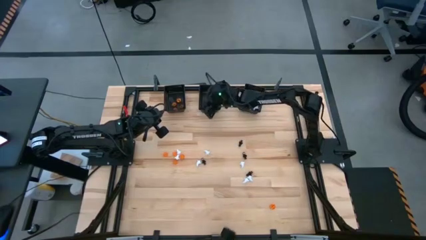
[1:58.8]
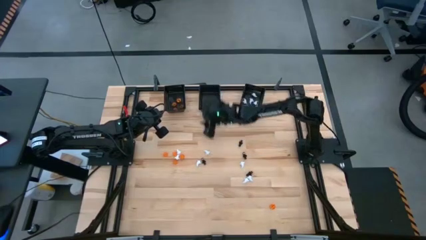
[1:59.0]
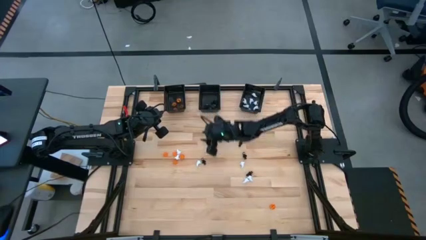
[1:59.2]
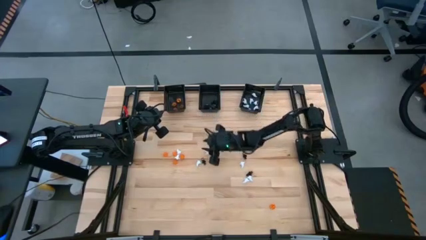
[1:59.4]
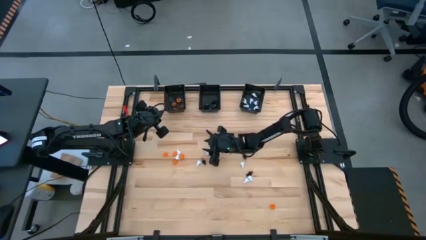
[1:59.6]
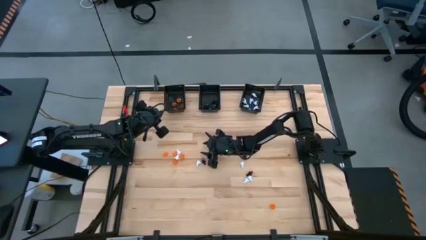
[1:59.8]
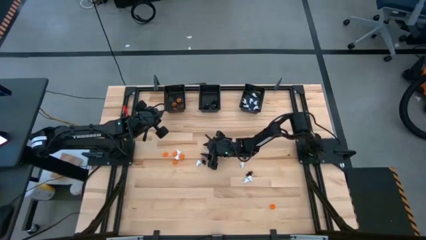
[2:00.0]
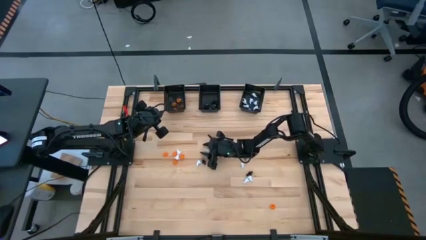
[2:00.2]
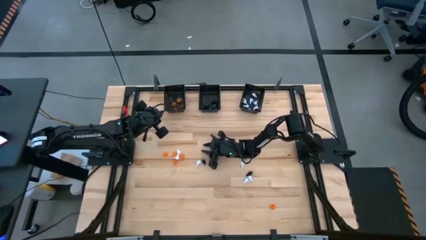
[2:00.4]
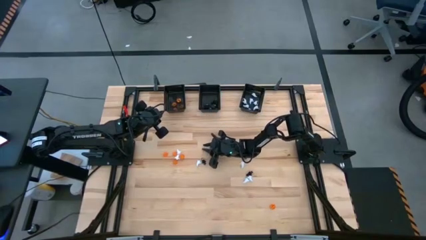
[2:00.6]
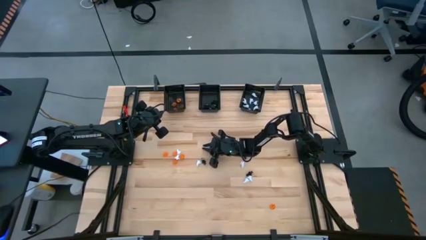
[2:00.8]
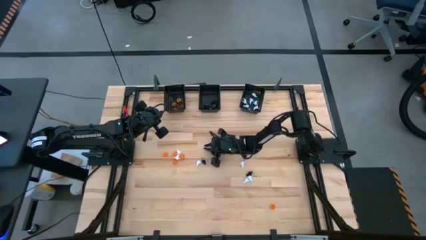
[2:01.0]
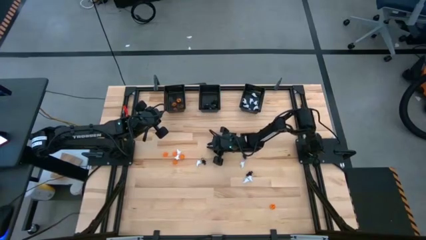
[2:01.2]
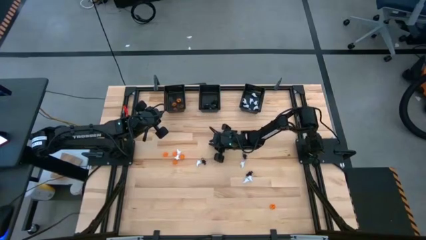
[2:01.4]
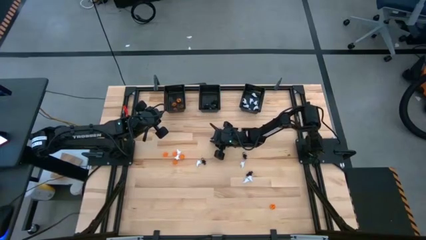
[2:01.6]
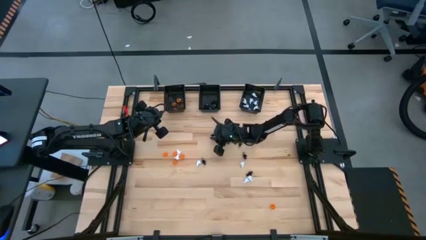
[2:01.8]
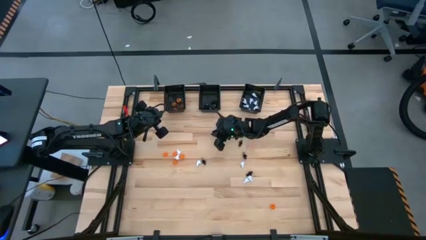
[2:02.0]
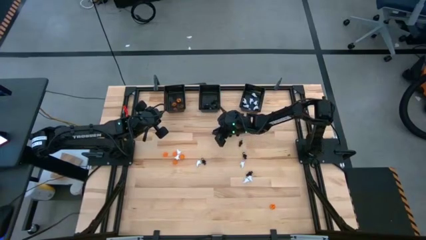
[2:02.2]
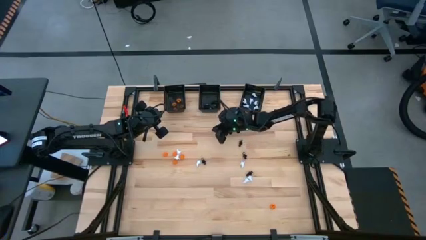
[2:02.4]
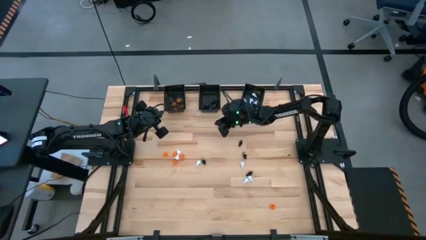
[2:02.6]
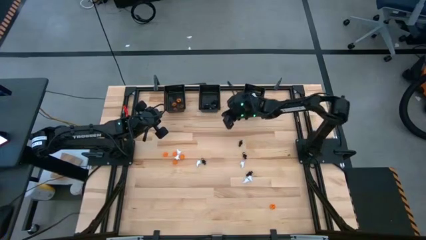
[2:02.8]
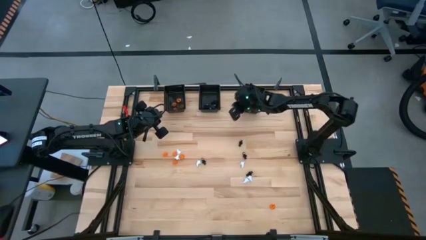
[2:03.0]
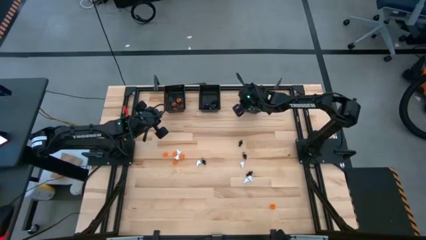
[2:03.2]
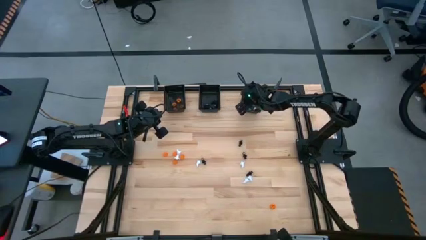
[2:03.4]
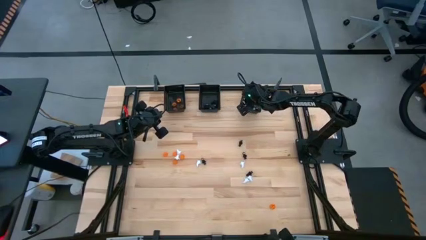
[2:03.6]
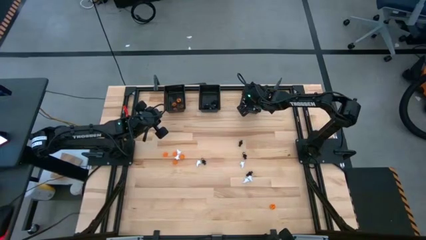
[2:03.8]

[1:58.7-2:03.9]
Task: Sort Halloween decoration
Put the white ghost toy into the right black basket

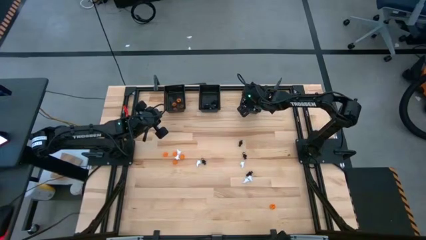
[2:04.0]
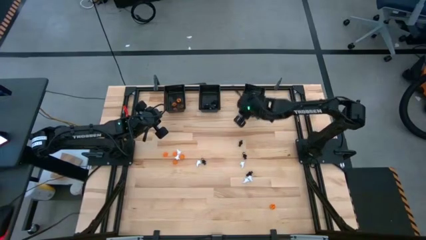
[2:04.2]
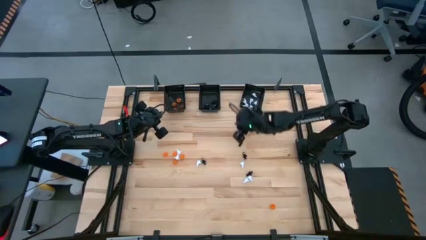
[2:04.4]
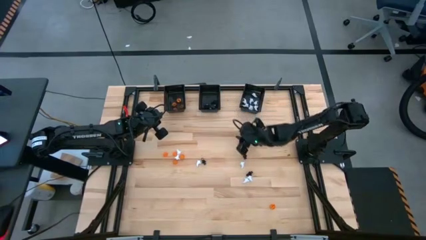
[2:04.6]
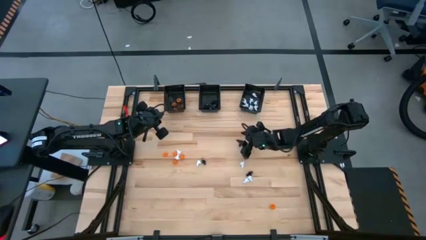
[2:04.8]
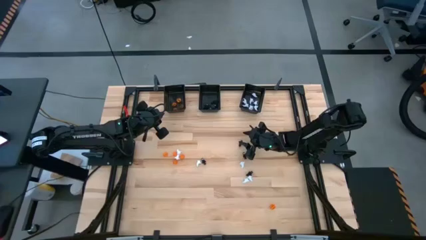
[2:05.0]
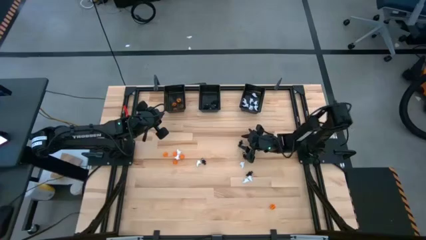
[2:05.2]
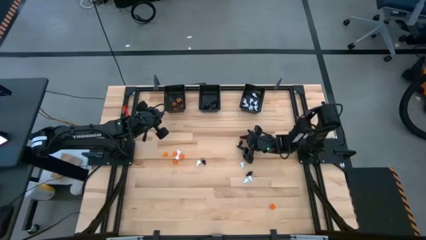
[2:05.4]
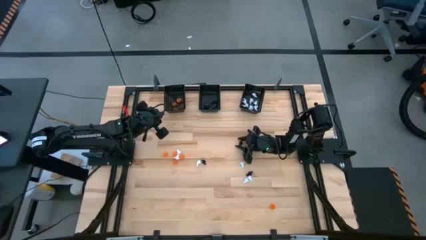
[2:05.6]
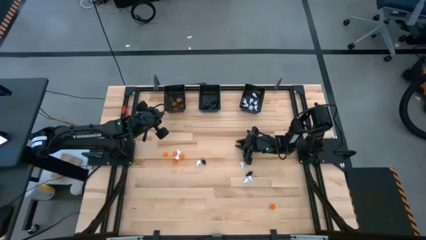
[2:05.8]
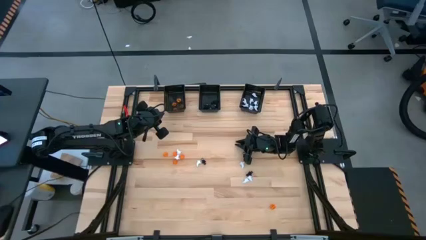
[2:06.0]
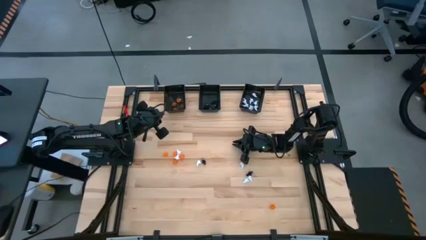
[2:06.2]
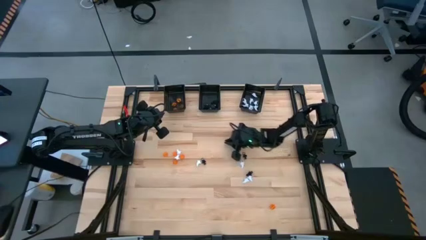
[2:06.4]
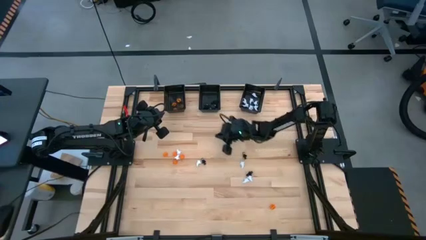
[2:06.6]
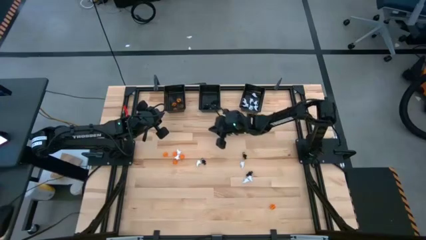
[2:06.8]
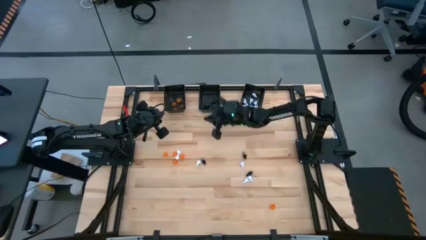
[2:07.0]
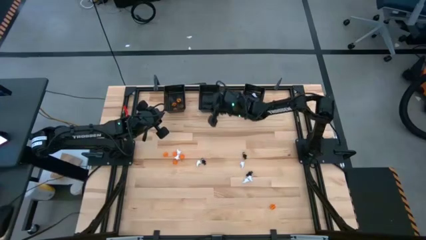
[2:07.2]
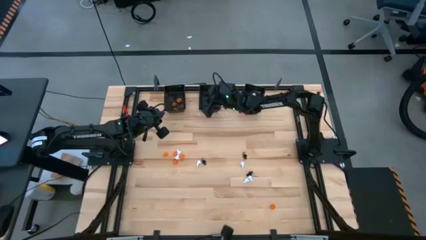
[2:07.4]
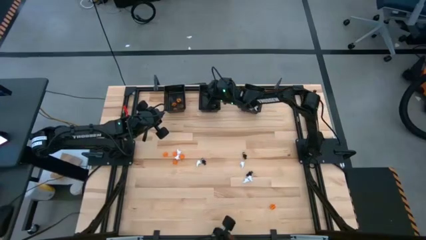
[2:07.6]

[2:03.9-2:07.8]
Put the black skeleton toy into the black middle basket

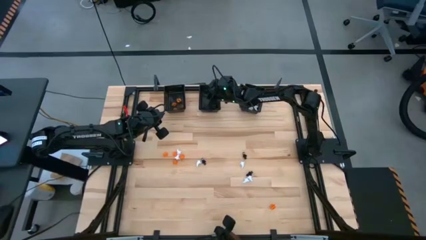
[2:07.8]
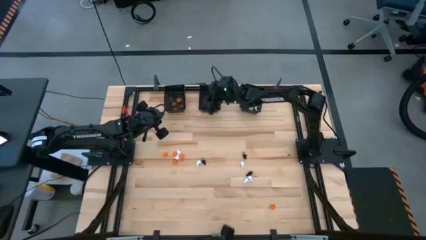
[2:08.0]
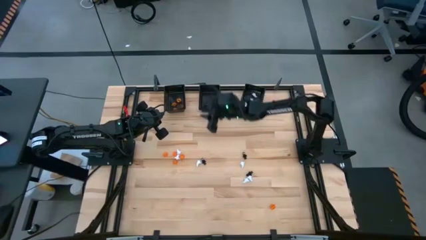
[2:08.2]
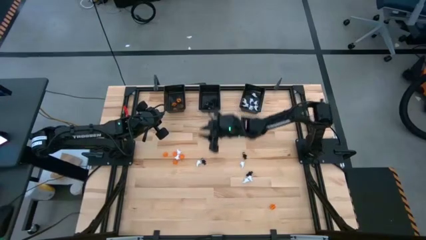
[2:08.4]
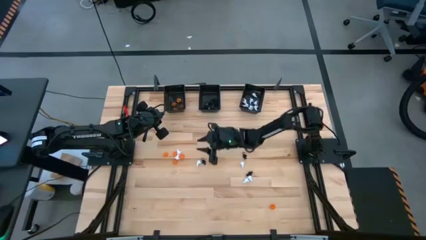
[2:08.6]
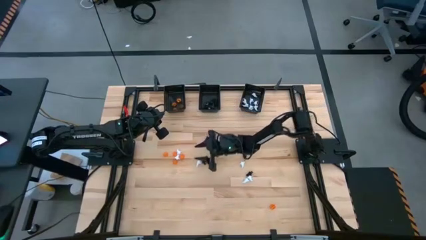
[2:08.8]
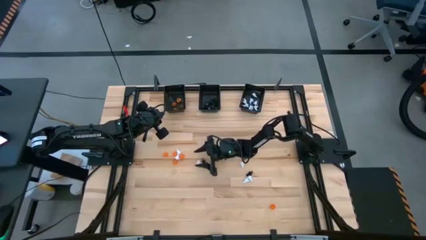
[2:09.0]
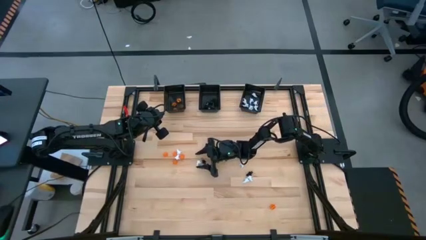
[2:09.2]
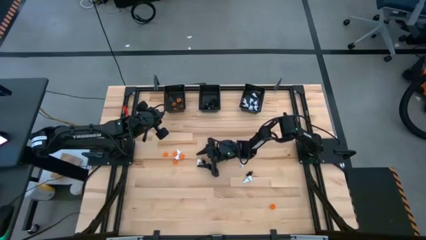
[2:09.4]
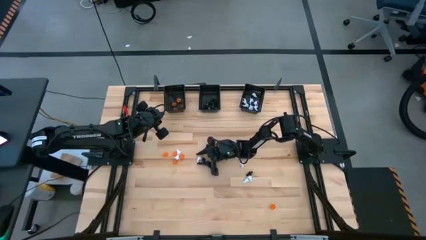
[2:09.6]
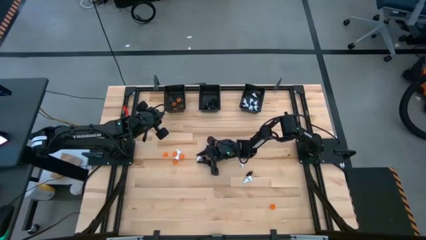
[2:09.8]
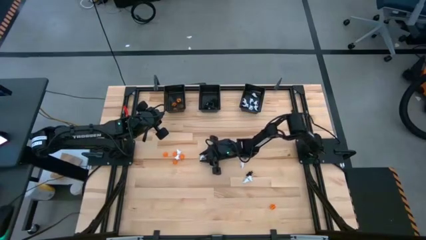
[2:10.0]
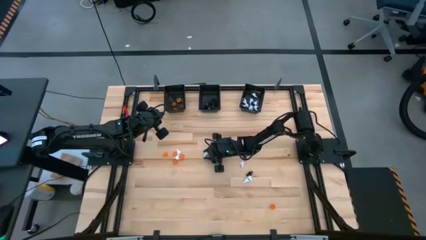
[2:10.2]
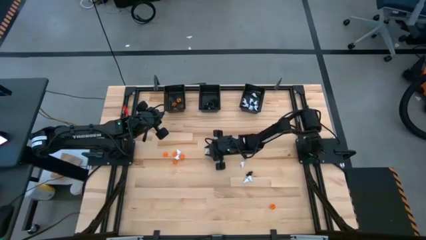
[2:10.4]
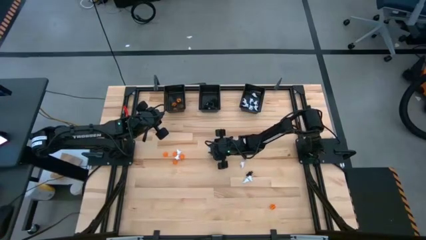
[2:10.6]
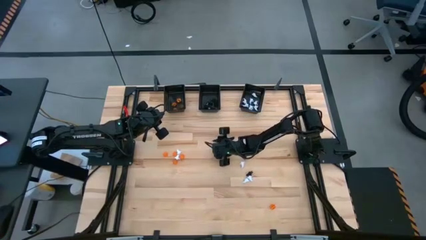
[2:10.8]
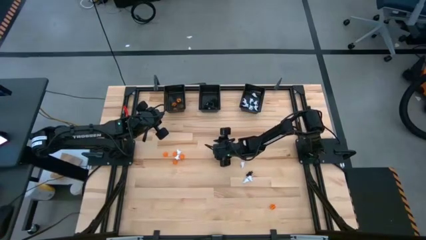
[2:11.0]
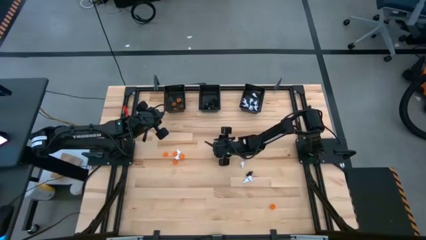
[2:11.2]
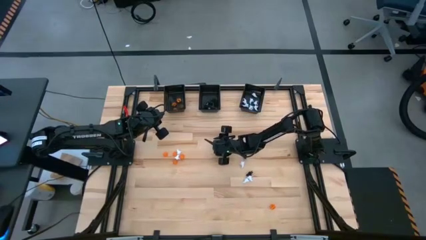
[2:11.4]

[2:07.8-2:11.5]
Put the white ghost toy into the right black basket

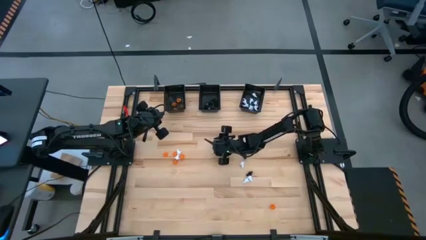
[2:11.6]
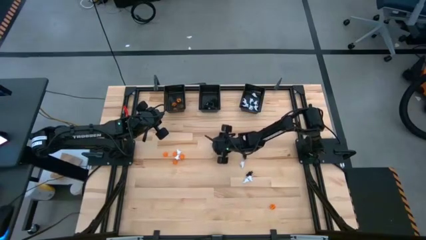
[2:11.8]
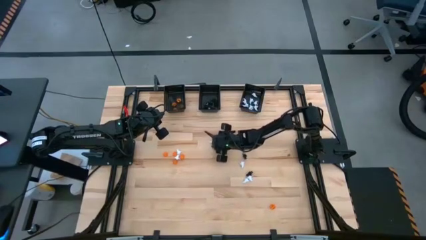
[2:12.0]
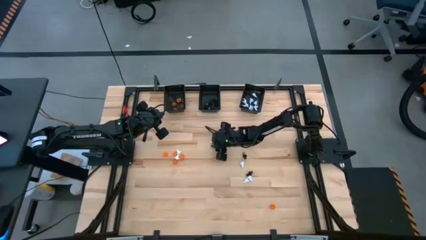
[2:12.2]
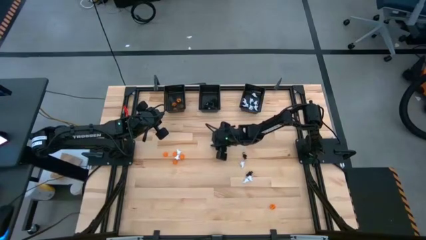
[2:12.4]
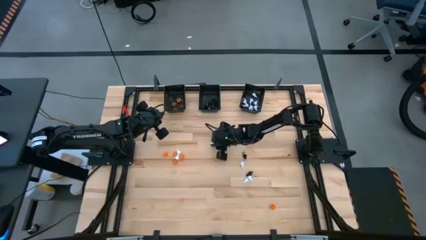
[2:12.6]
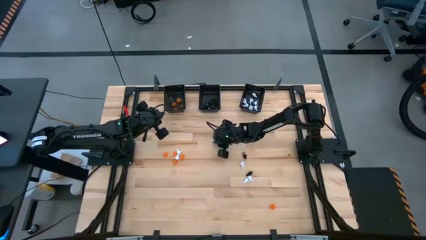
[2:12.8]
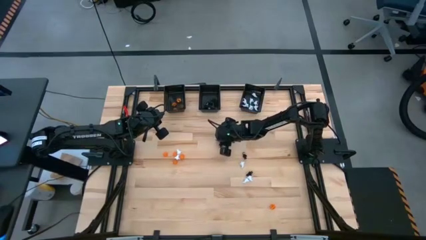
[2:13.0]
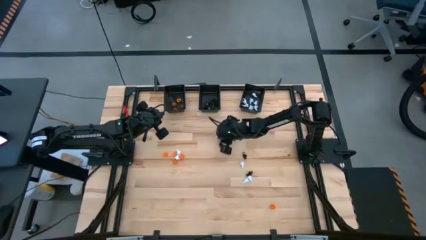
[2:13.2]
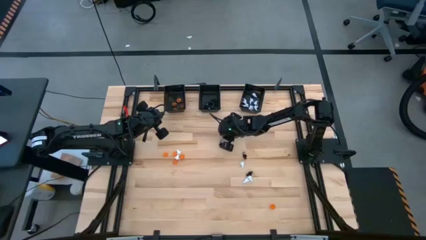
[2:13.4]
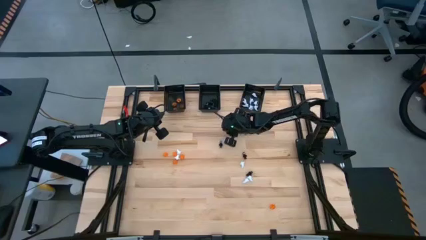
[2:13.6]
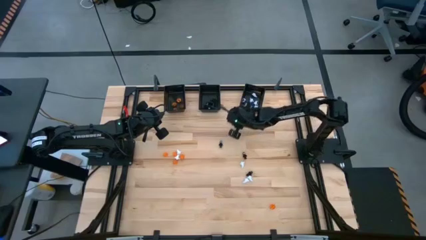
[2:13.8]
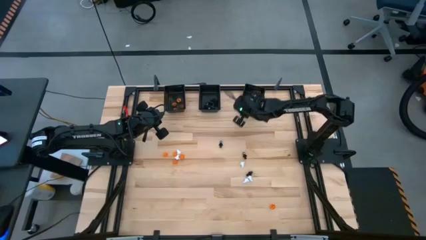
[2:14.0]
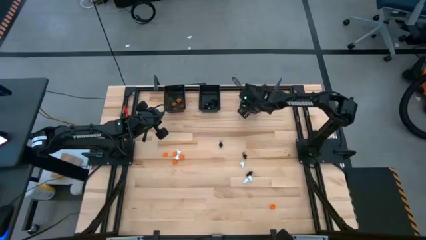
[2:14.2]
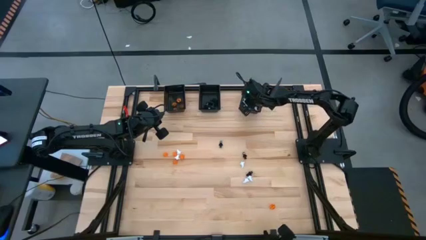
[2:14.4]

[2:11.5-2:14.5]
Put the white ghost toy into the right black basket

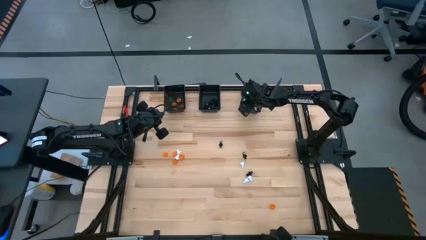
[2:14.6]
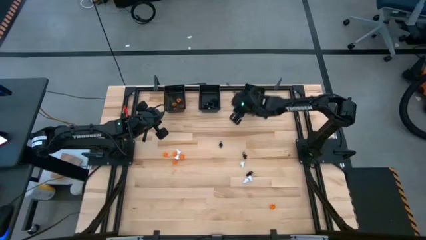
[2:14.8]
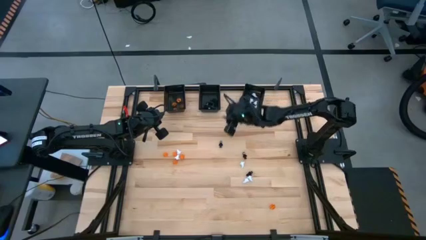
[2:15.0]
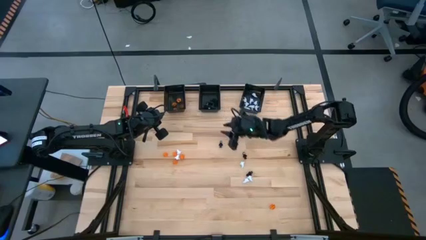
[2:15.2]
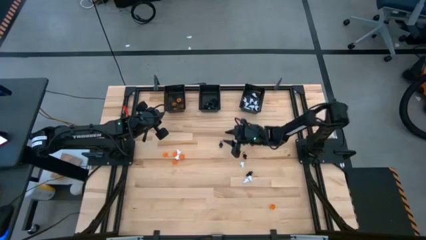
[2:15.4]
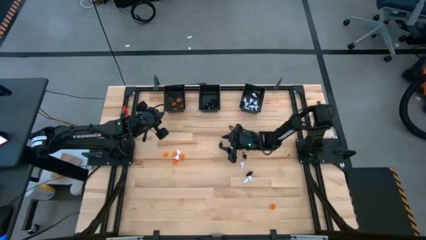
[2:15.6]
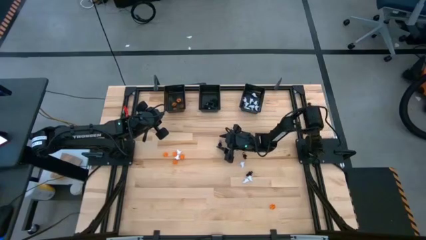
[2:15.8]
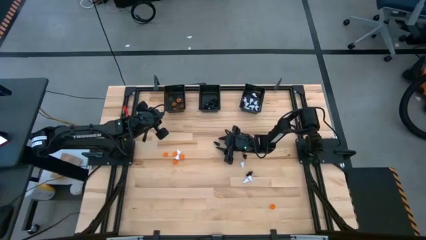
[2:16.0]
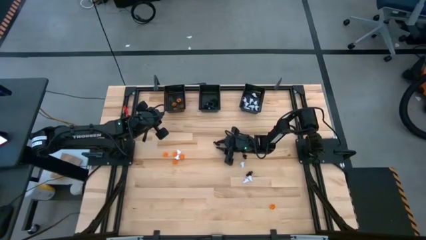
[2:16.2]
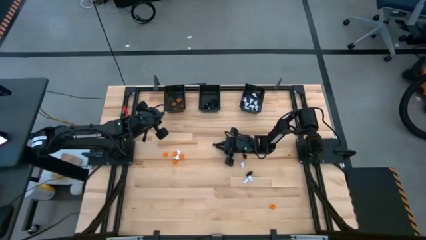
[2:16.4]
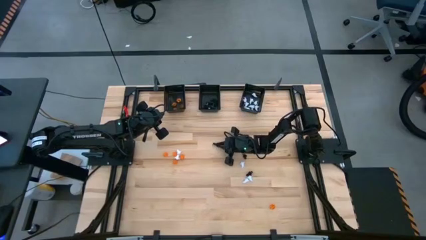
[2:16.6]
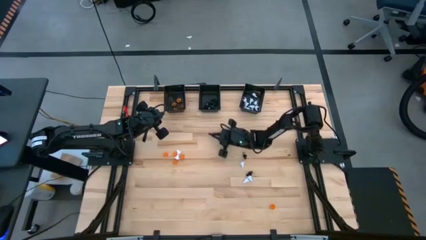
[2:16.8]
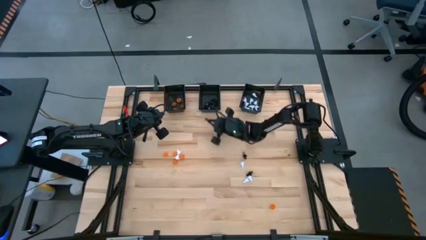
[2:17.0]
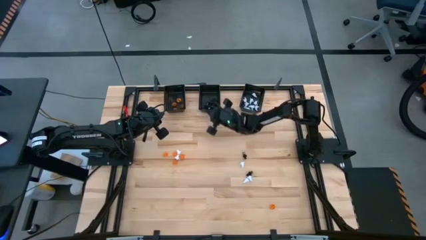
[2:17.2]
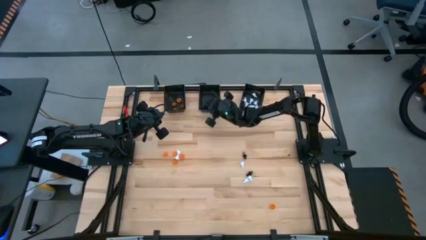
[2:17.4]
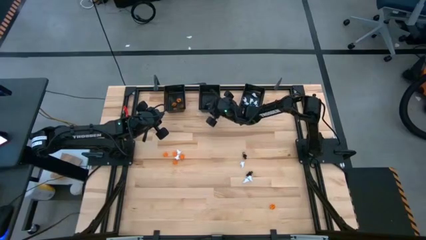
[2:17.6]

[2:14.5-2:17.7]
Put the black skeleton toy into the black middle basket
